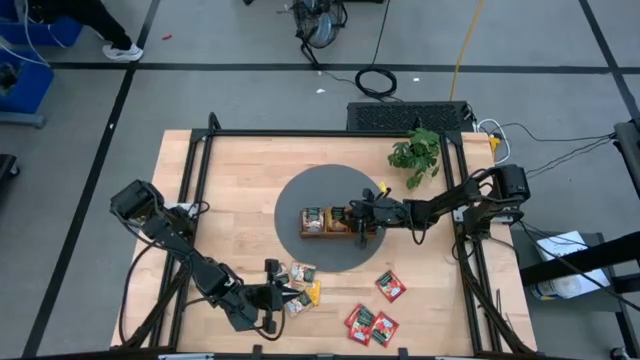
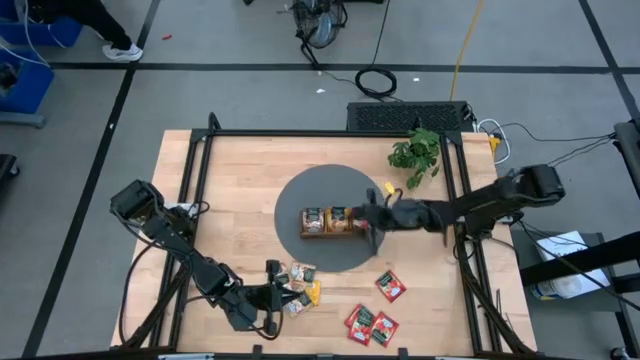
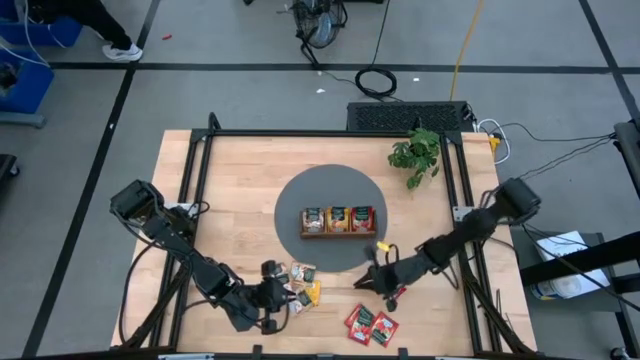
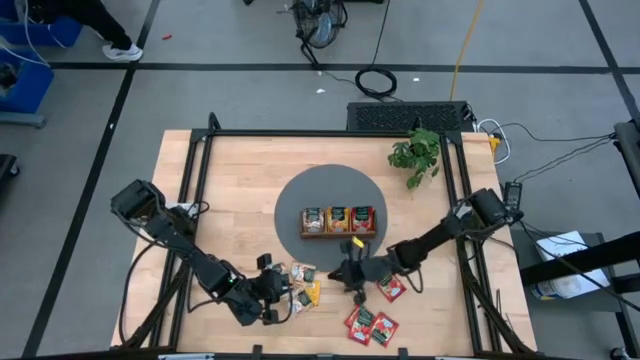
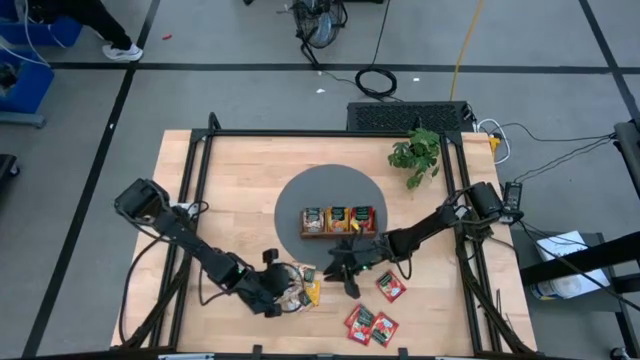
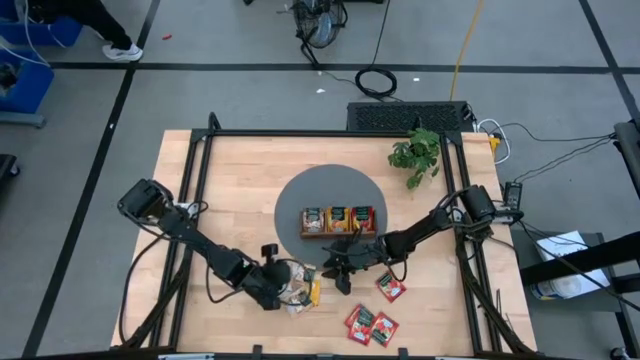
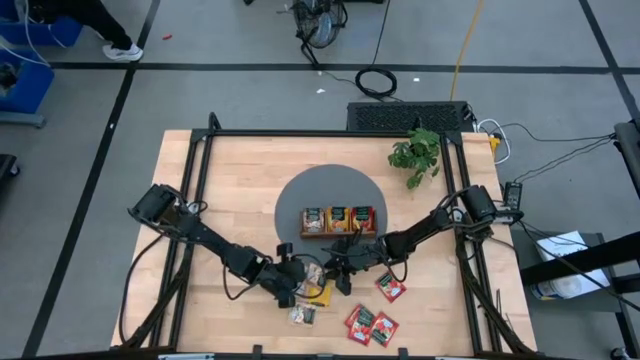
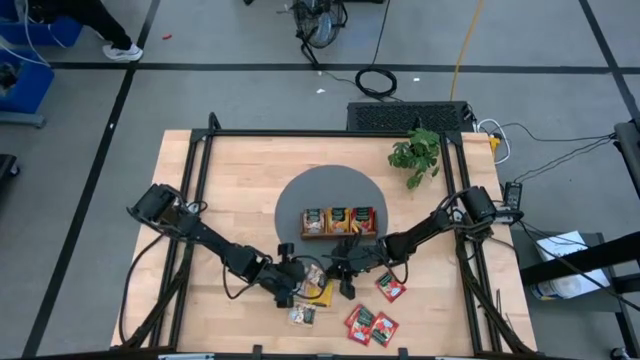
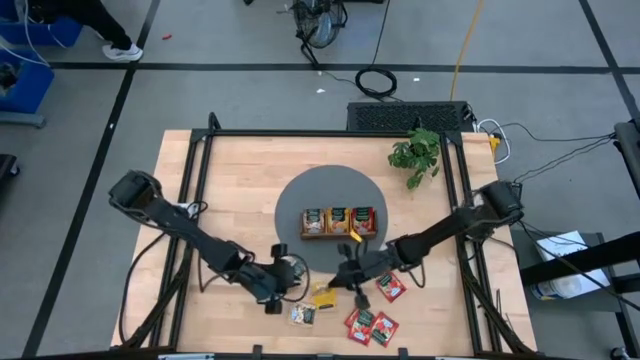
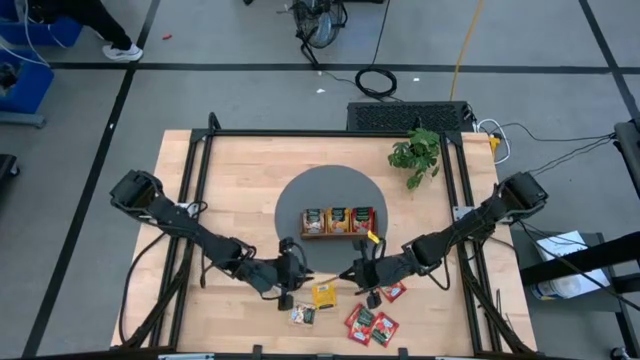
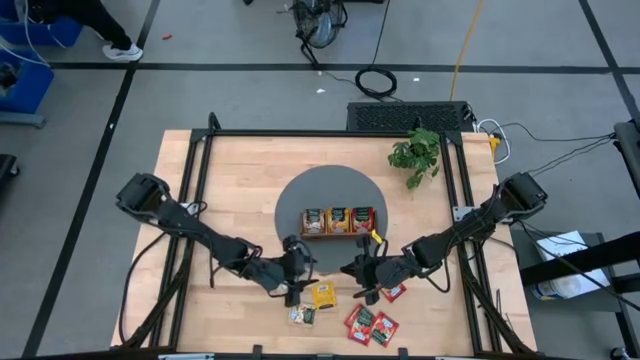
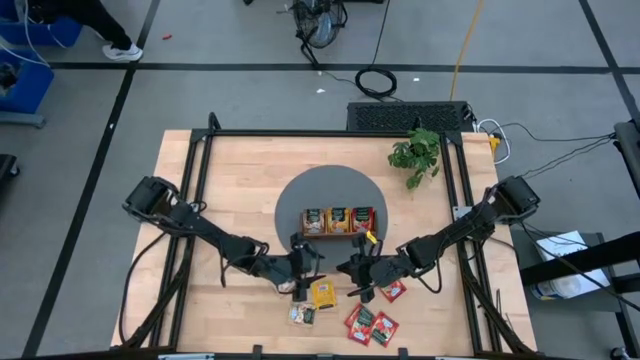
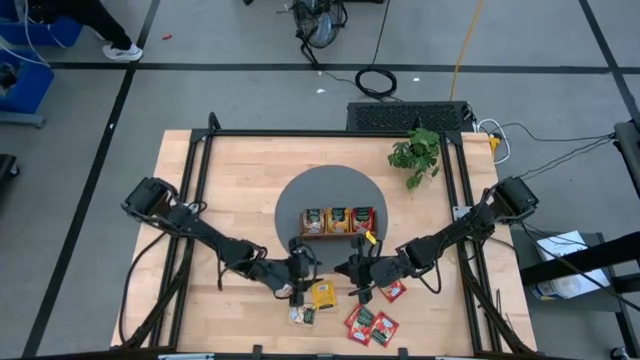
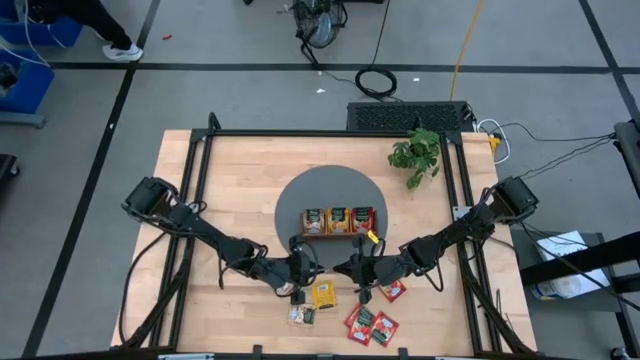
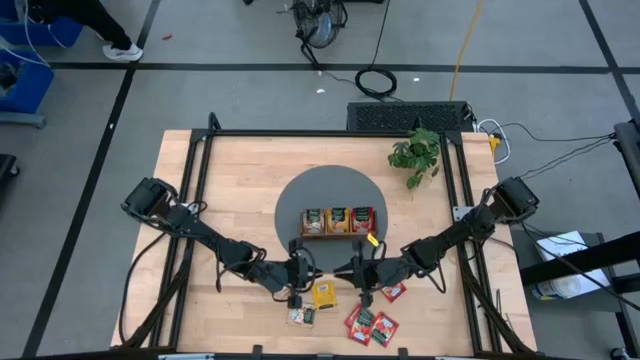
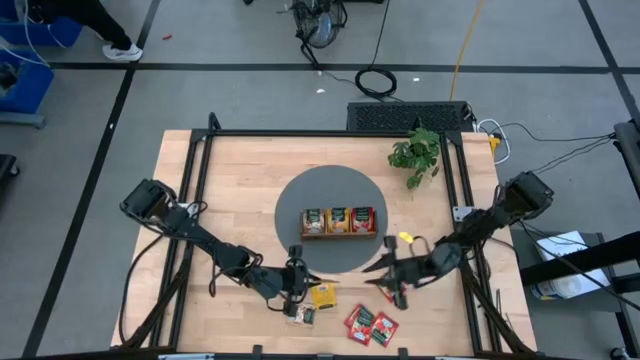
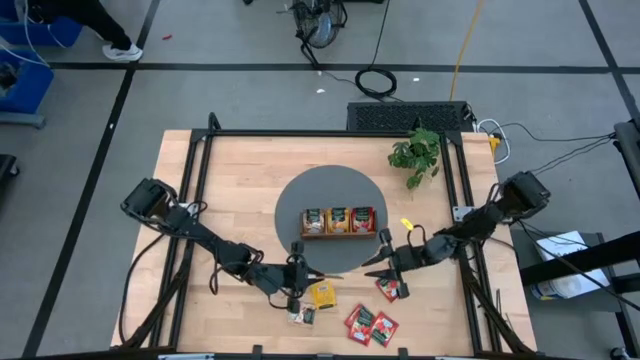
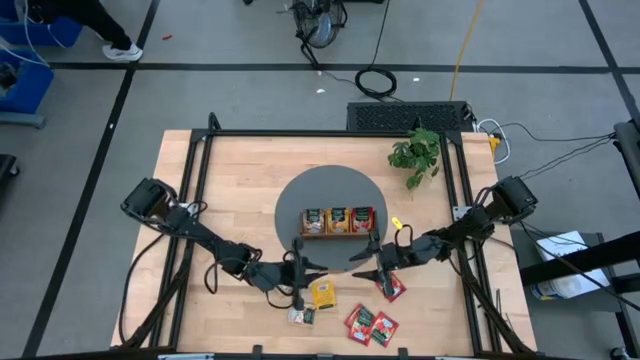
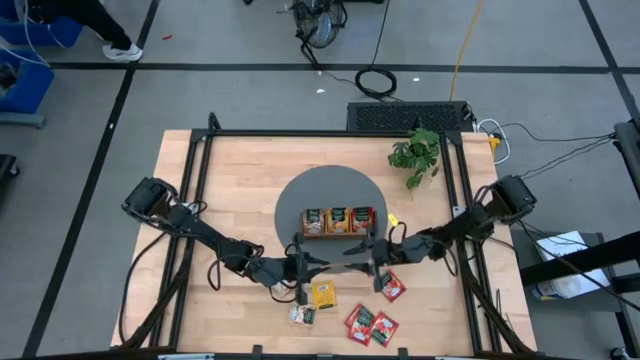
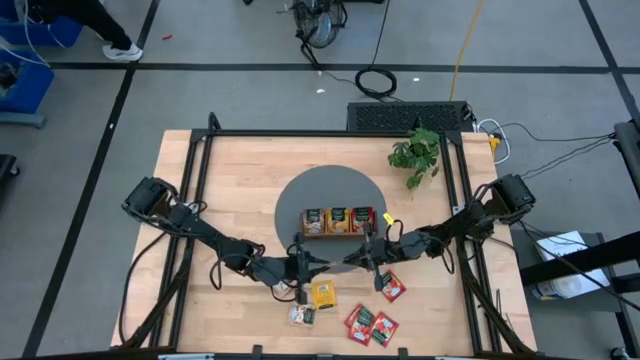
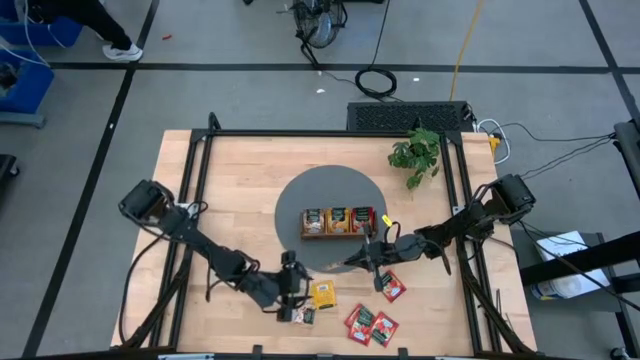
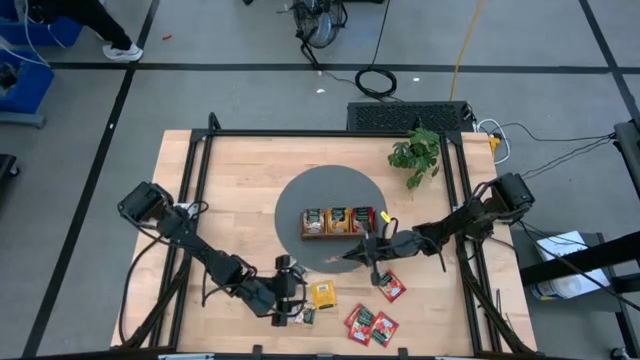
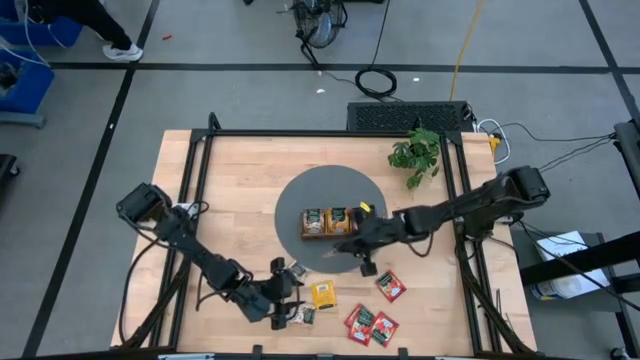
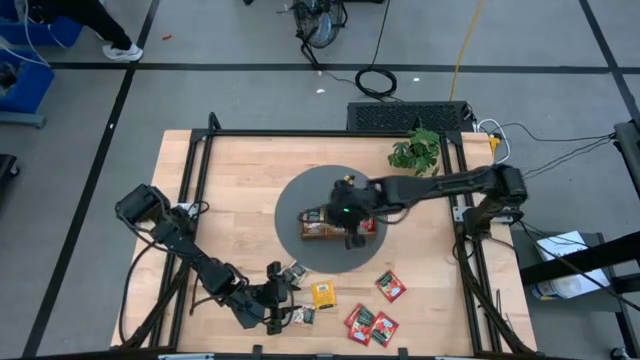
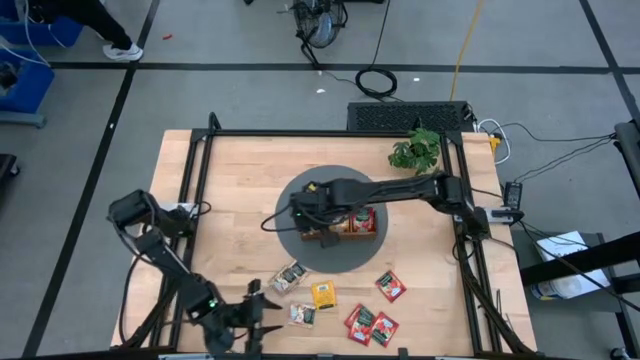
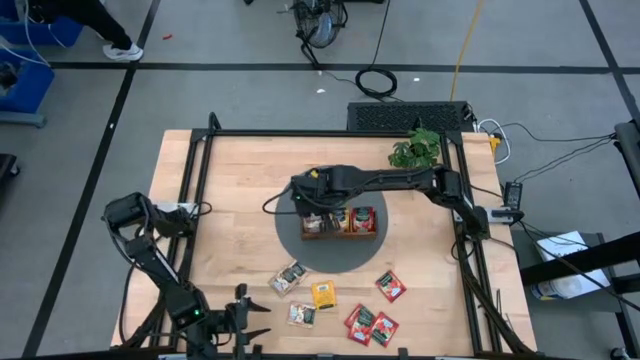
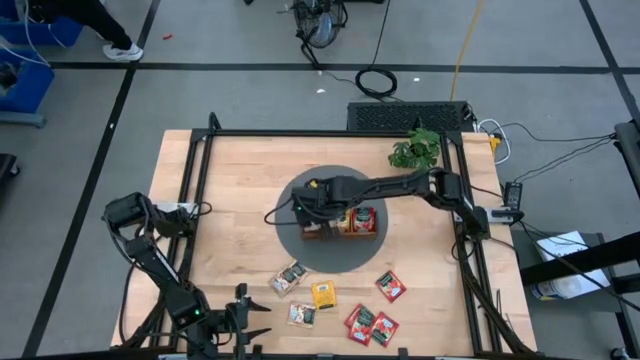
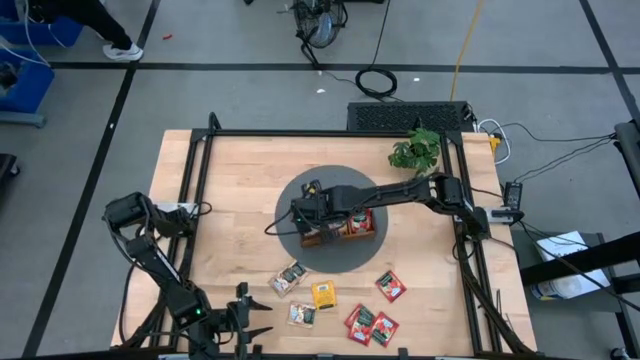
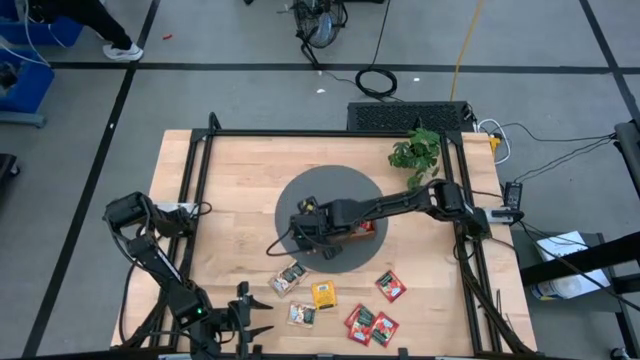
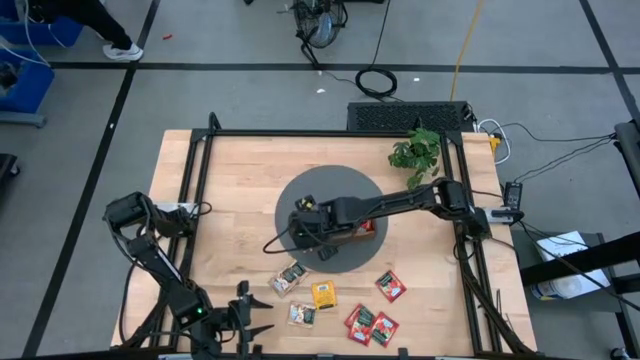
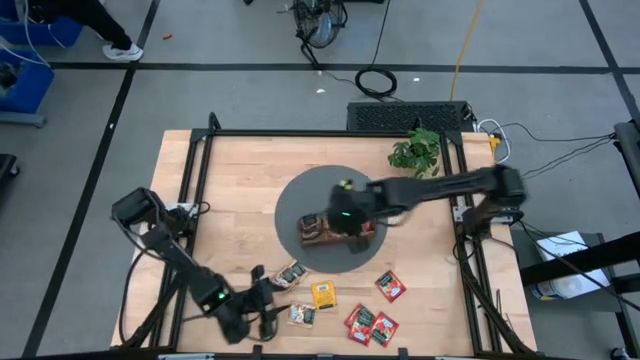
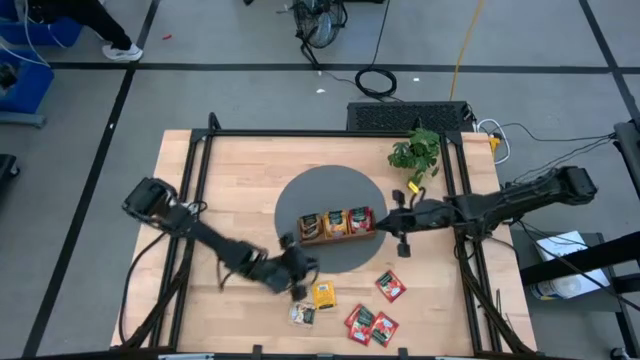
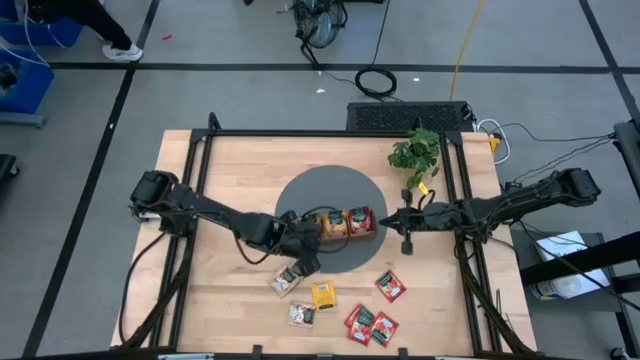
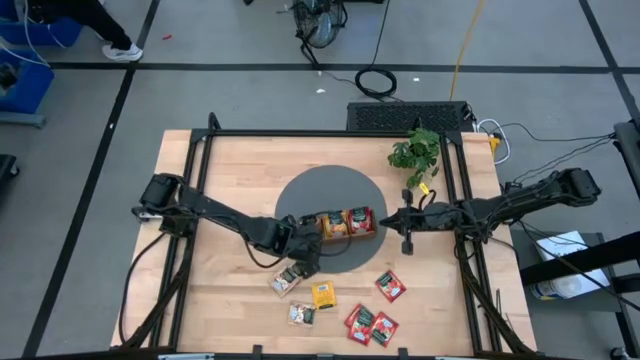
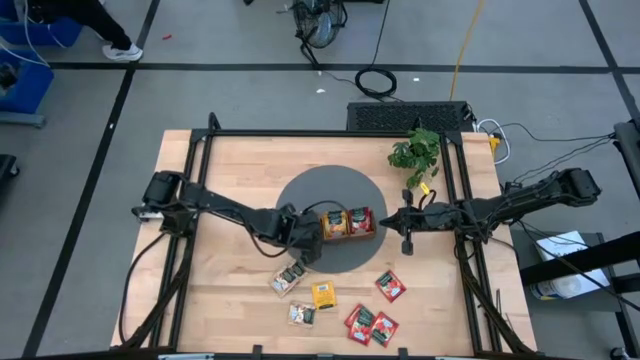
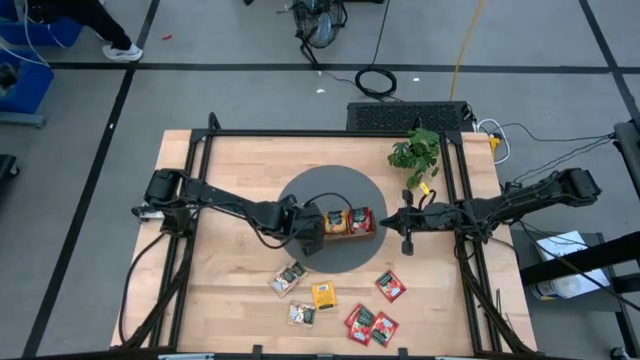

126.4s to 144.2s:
Task: Pick & Place Tea
Put the brown tea bag into the left slot of the wooden organizer

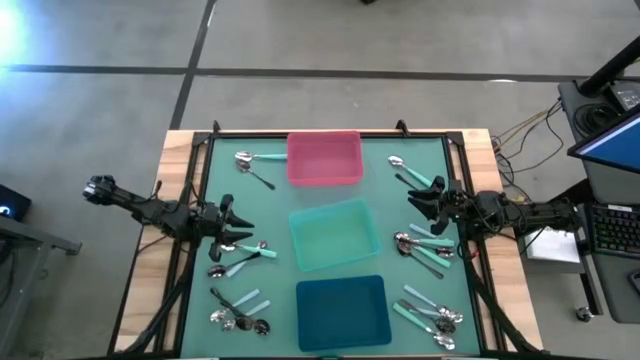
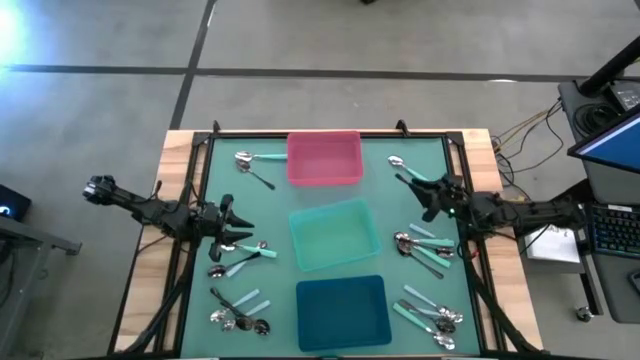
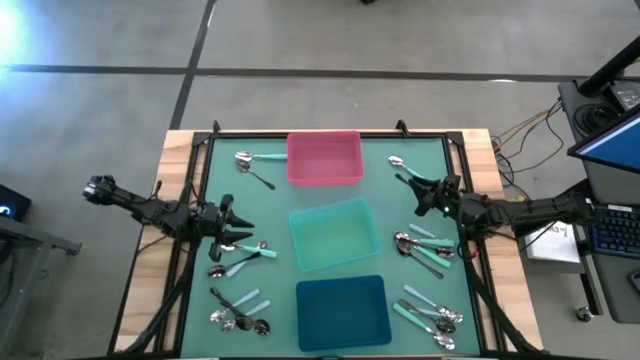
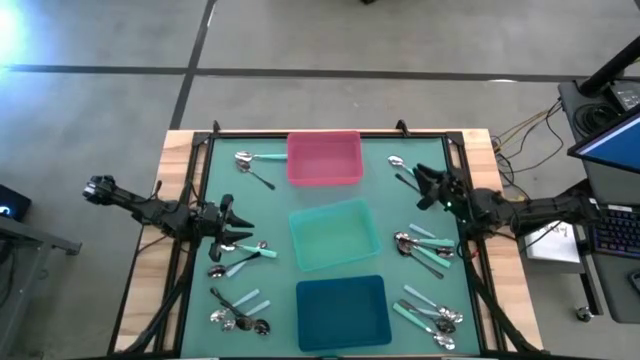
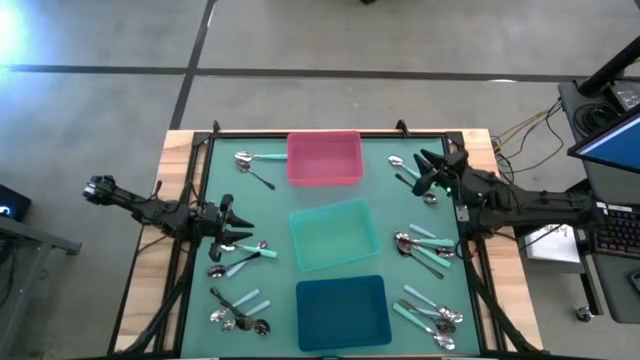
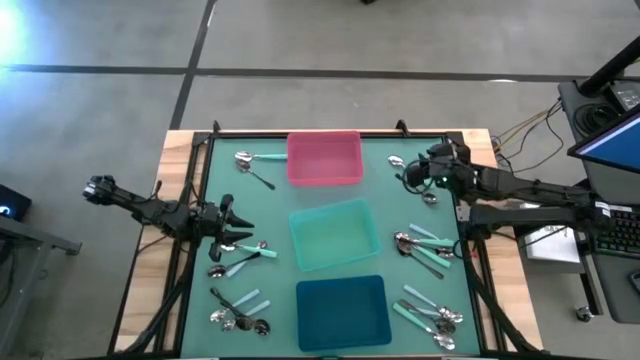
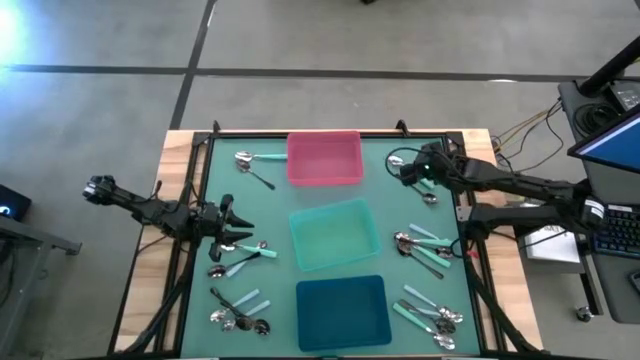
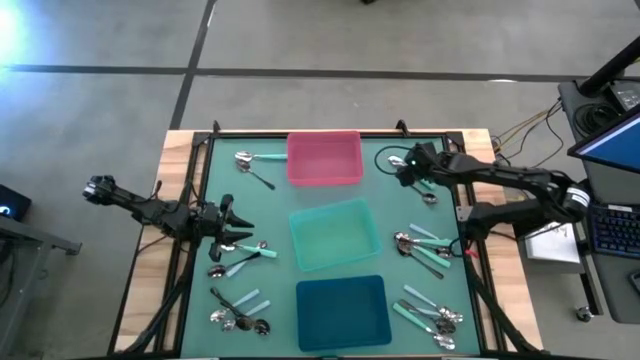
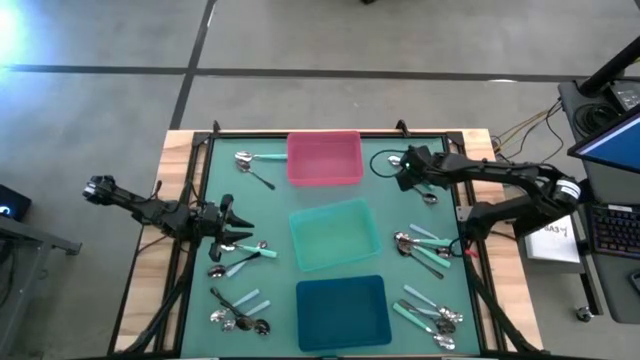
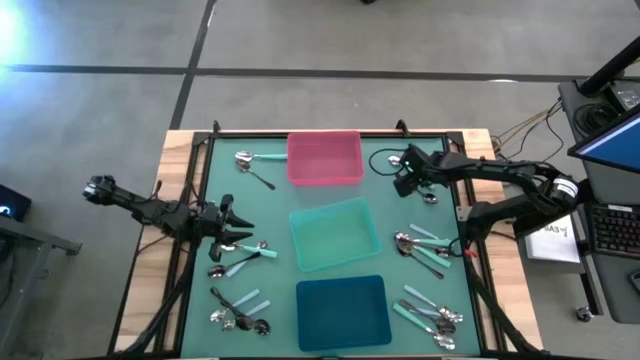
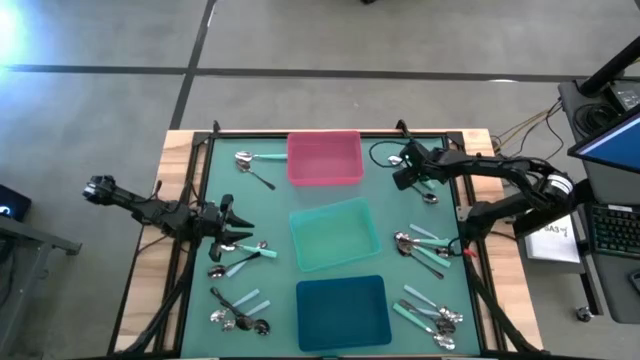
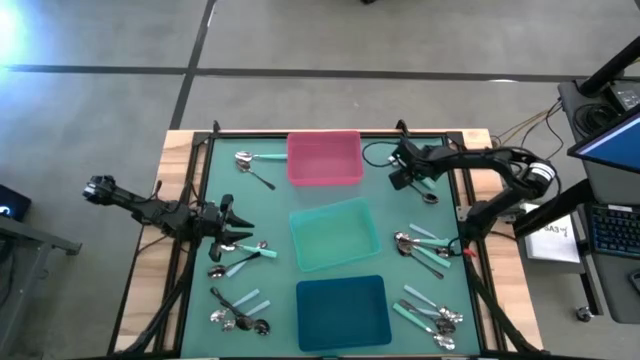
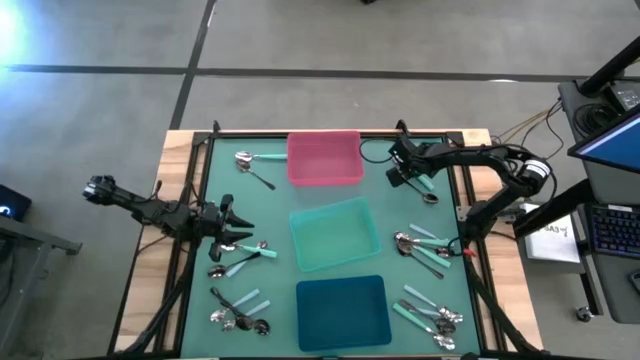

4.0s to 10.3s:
Task: Sort silverware by color (type)
Put the green spoon into the pink bin
